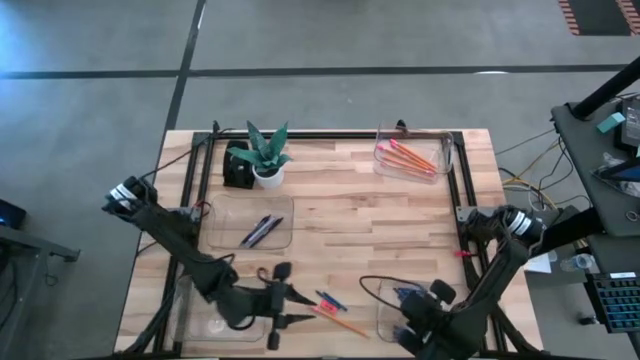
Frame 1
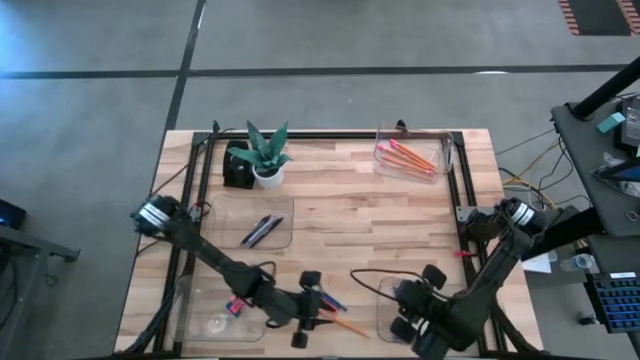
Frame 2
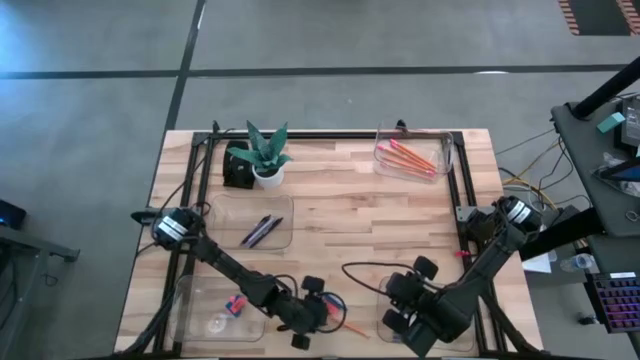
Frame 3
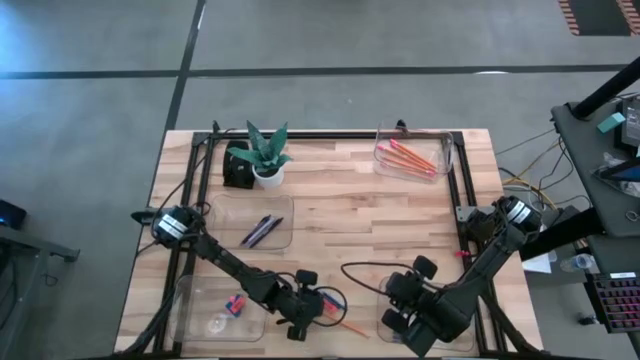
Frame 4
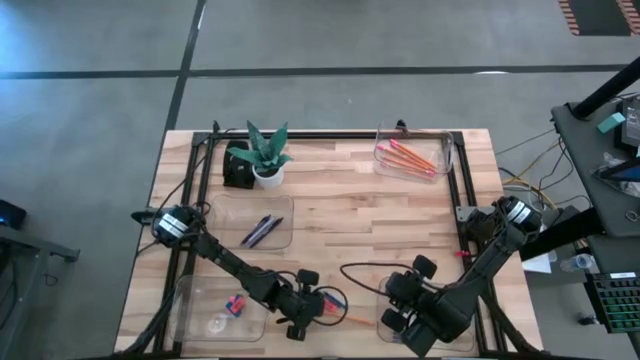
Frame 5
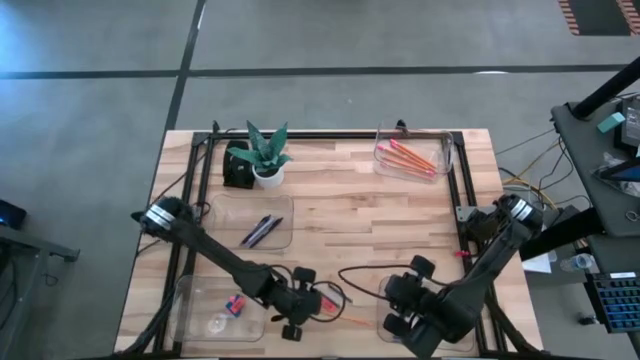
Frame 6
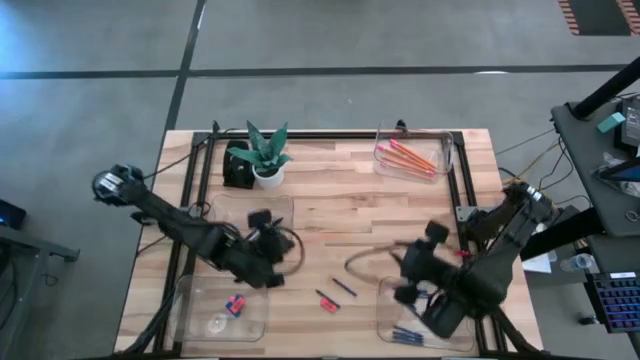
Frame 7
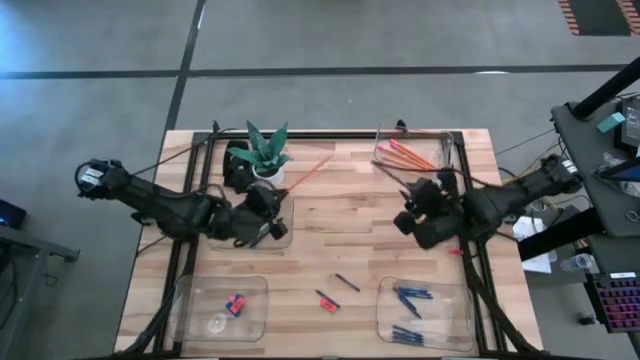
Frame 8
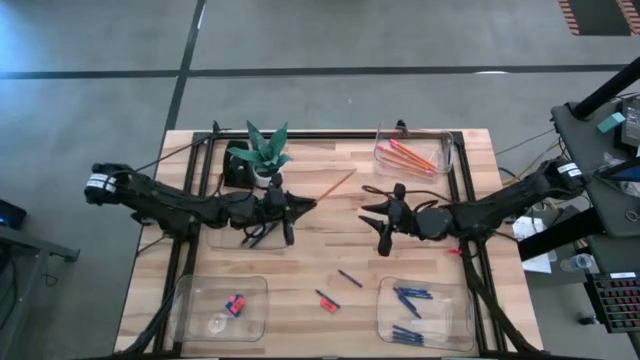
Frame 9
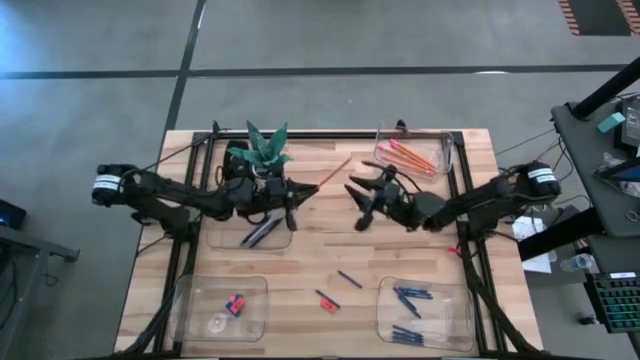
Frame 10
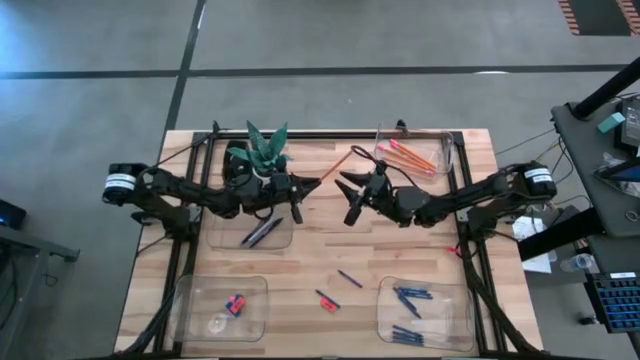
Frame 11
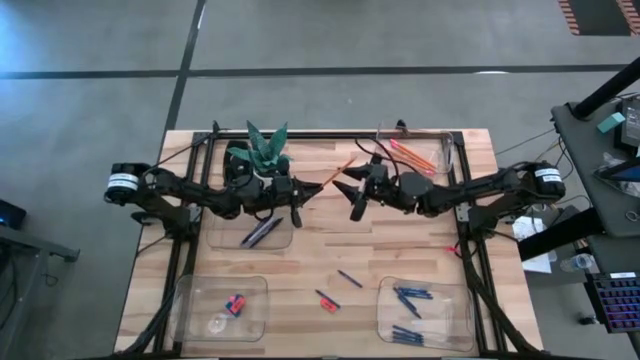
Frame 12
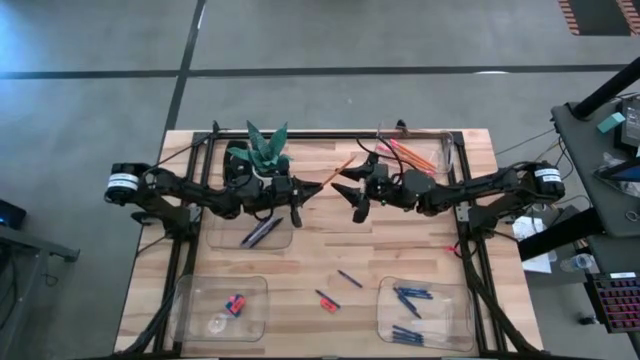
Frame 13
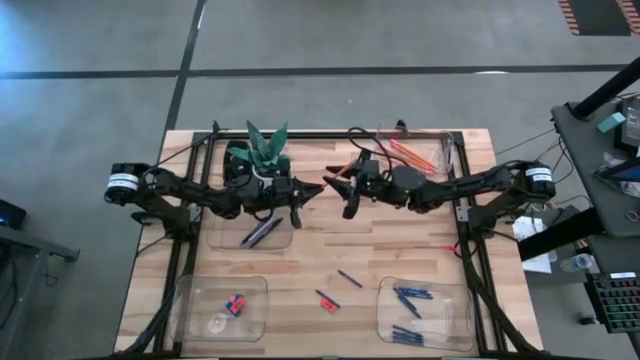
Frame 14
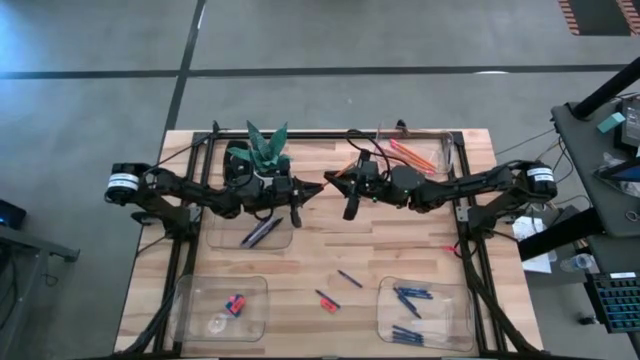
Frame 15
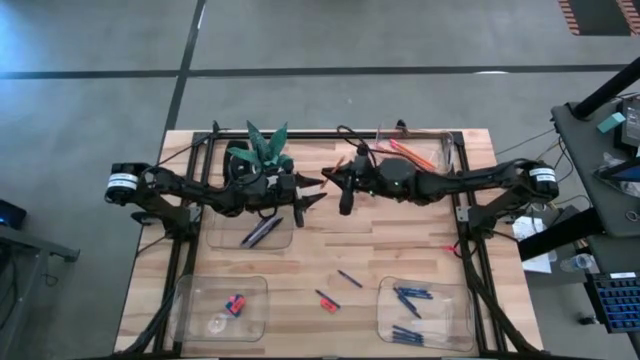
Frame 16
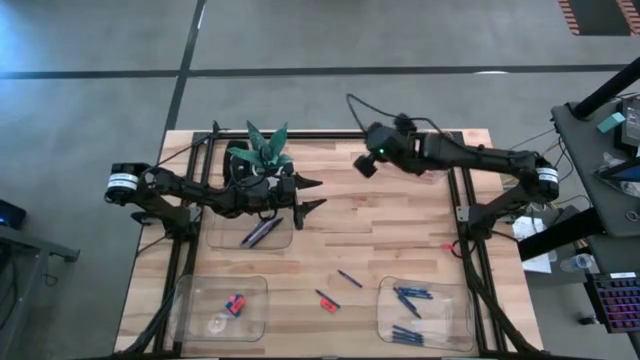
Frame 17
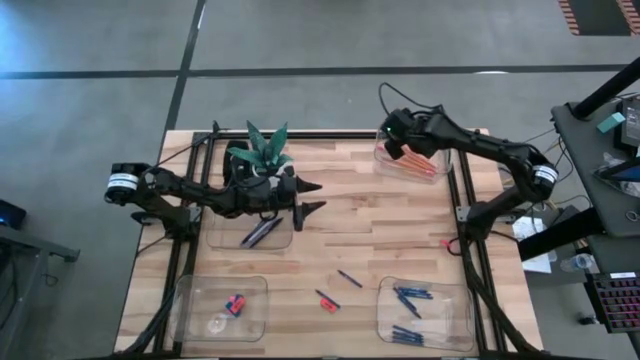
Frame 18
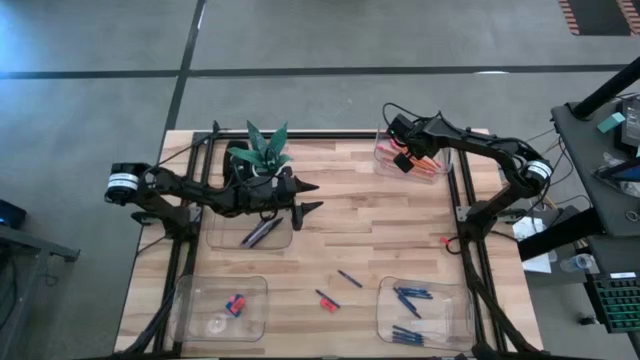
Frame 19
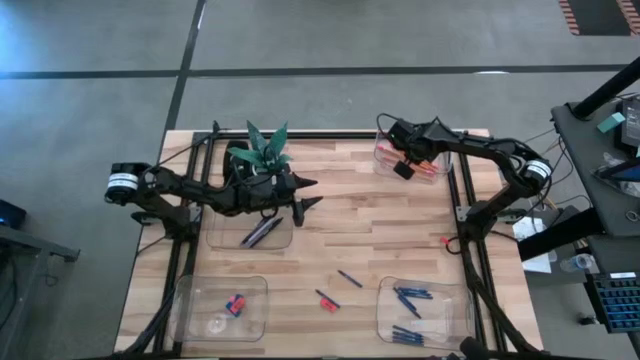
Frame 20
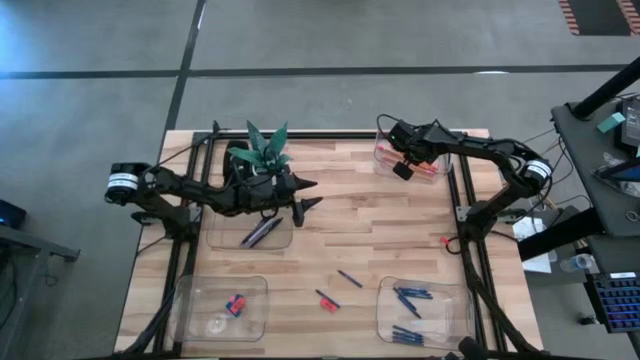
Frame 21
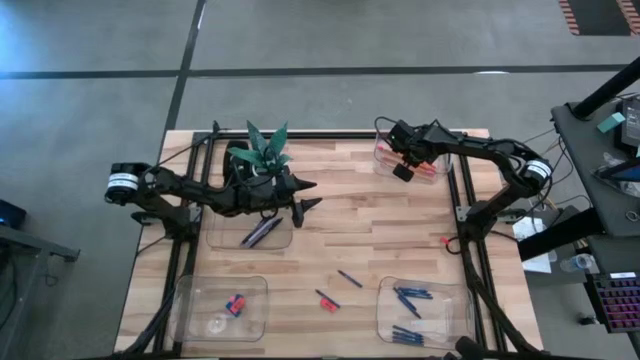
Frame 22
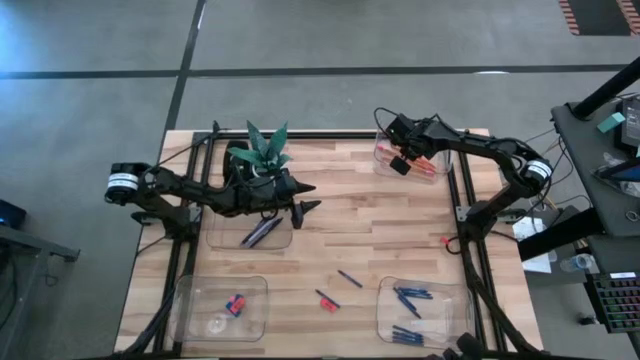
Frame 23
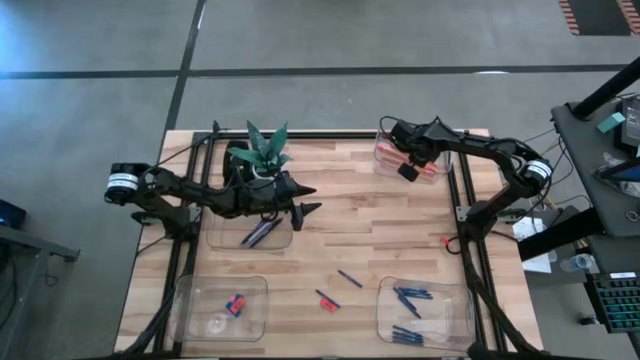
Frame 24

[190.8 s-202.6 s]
Task: Sort crayons/erasers/pens/pencils in bins
Put the orange pencil into the top right transparent bin

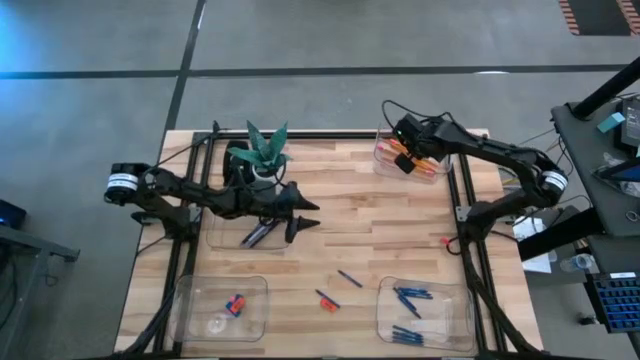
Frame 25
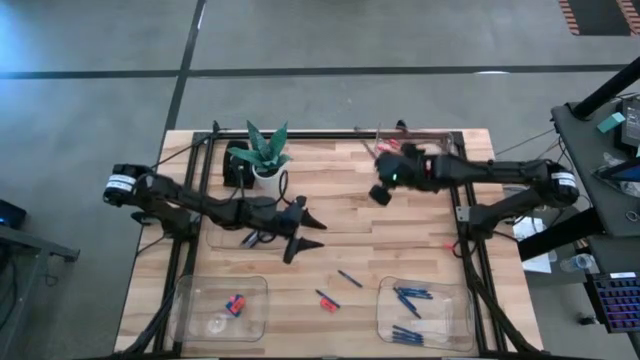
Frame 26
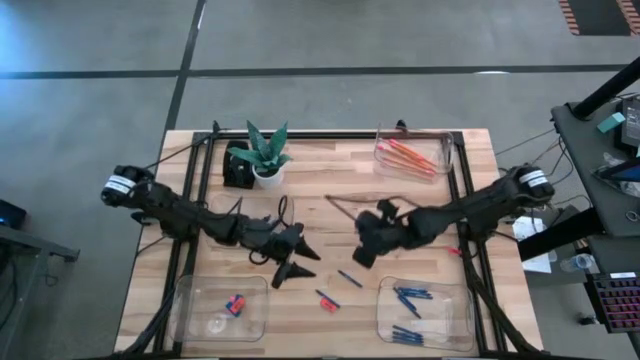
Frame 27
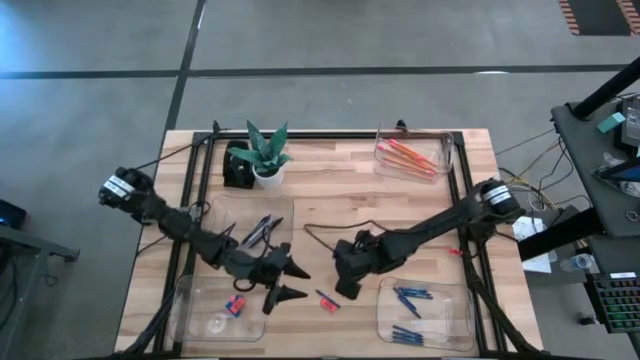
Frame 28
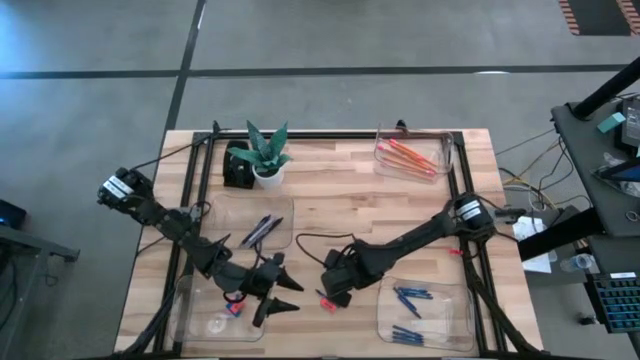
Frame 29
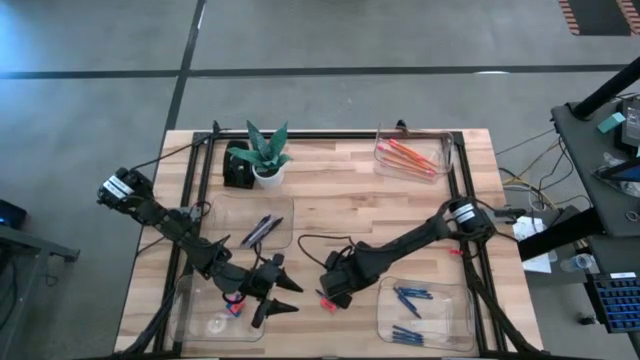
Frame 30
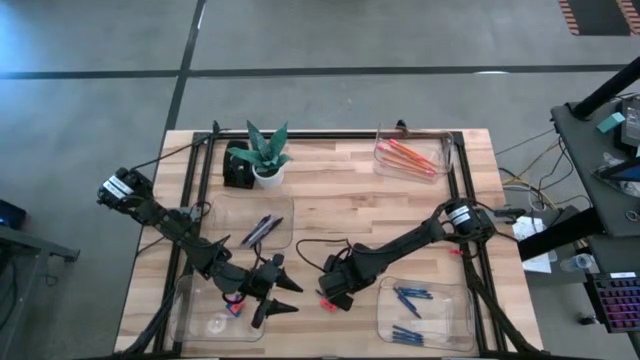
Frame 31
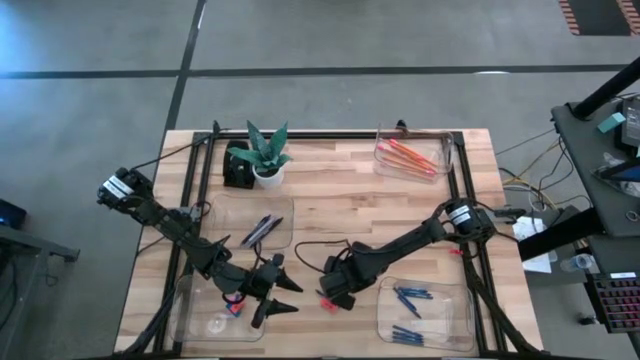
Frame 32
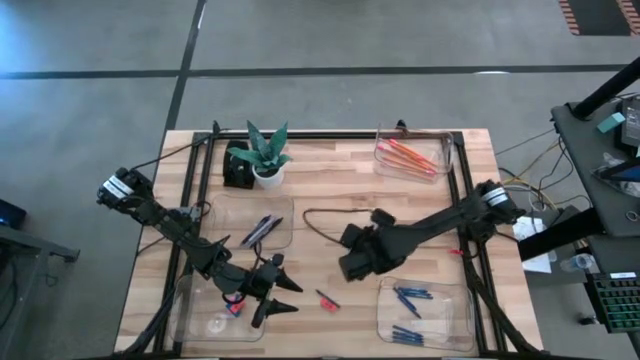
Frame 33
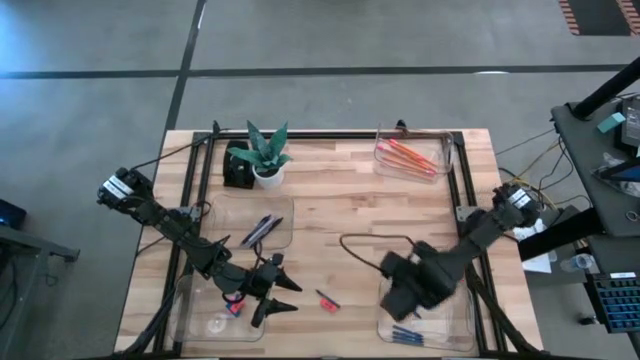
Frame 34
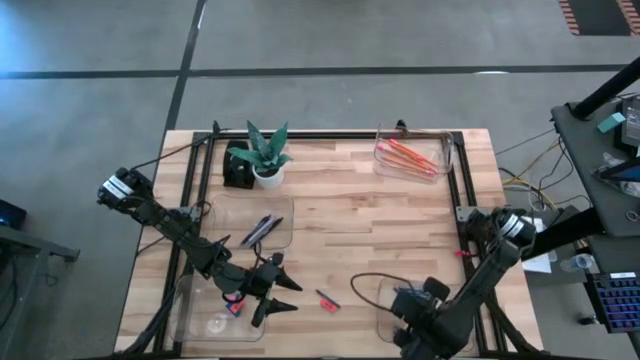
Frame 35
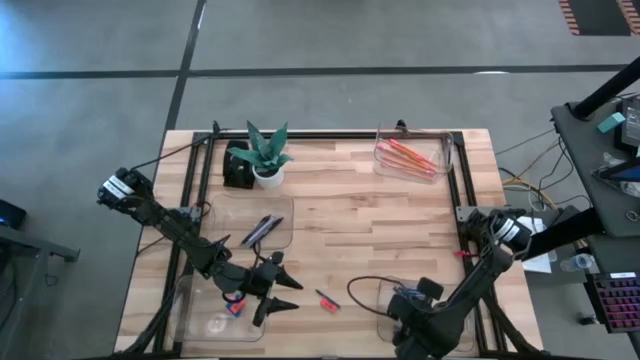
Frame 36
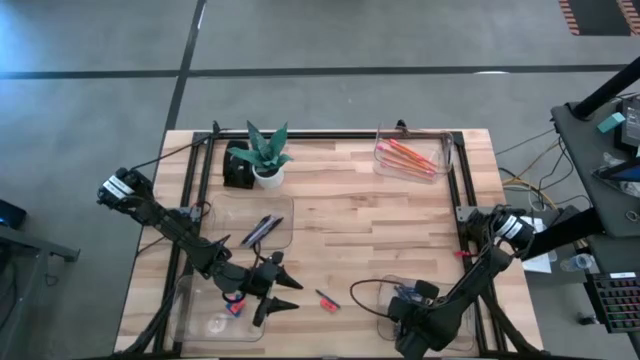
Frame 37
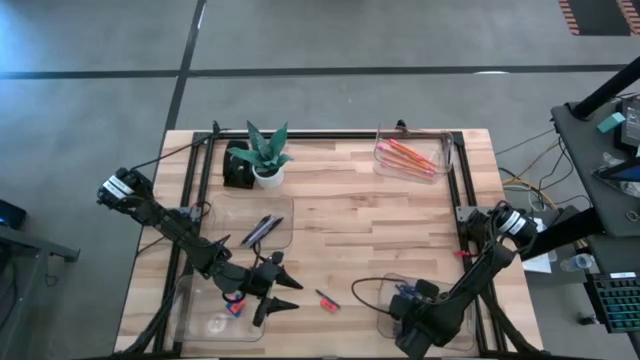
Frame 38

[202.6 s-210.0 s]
Put the blue crayon into the bottom right transparent bin
